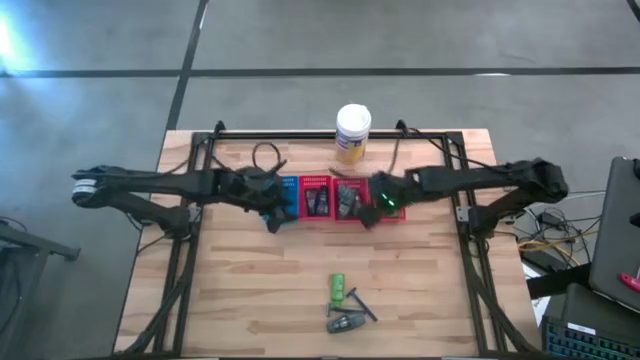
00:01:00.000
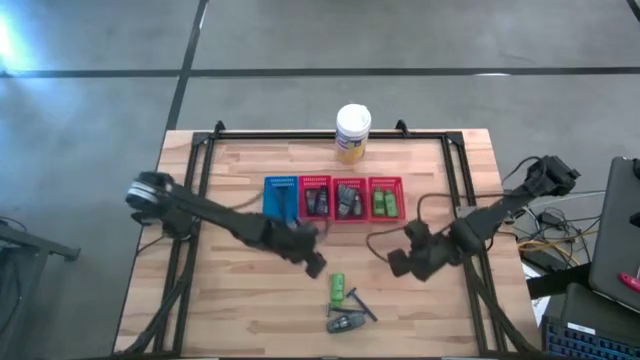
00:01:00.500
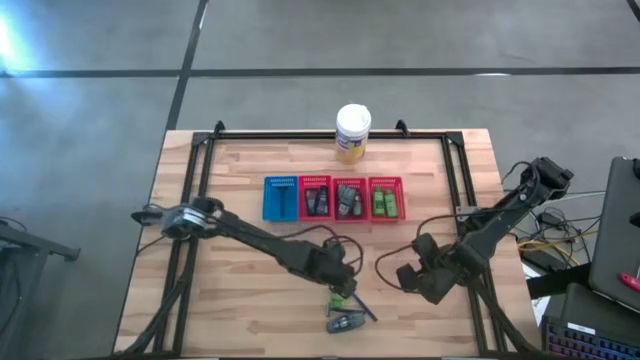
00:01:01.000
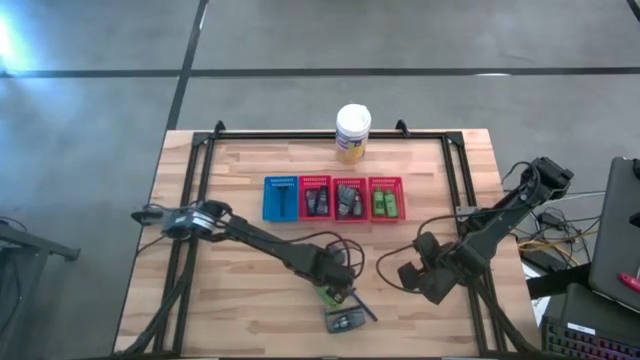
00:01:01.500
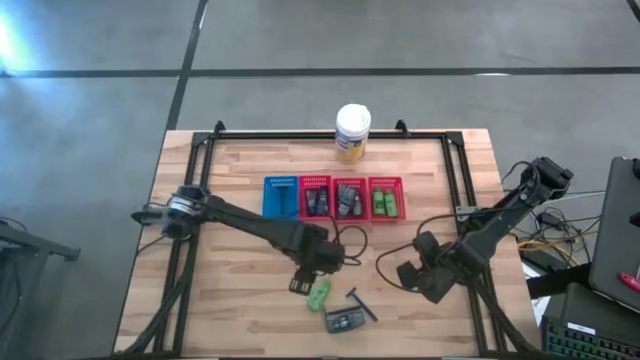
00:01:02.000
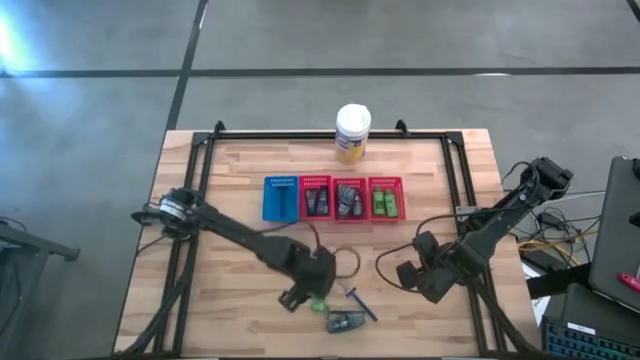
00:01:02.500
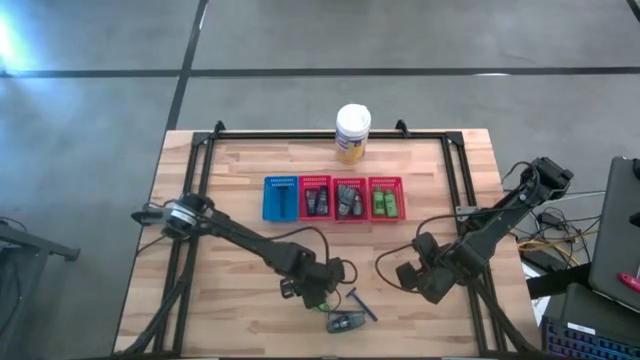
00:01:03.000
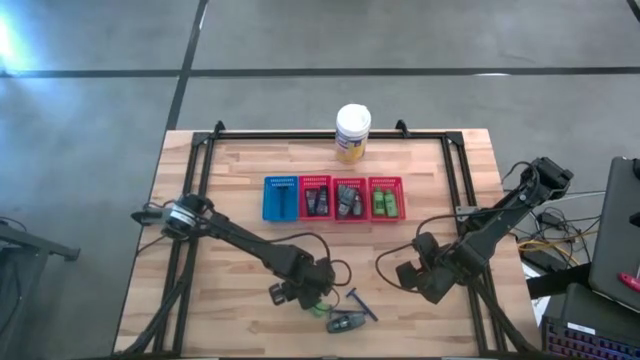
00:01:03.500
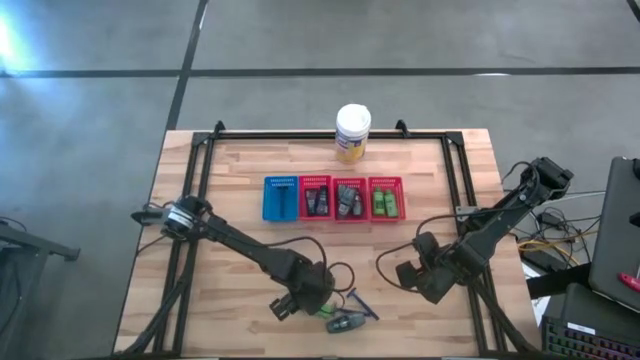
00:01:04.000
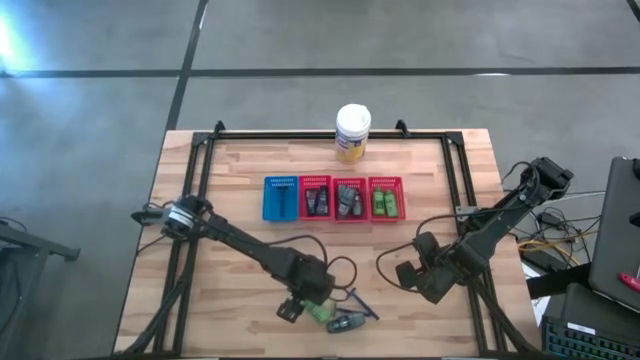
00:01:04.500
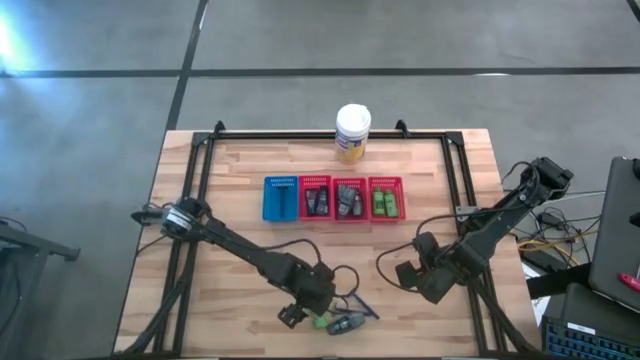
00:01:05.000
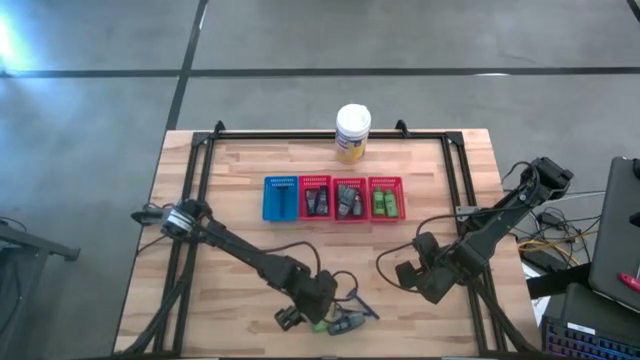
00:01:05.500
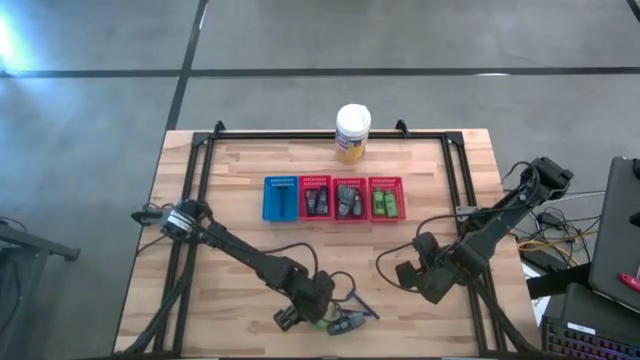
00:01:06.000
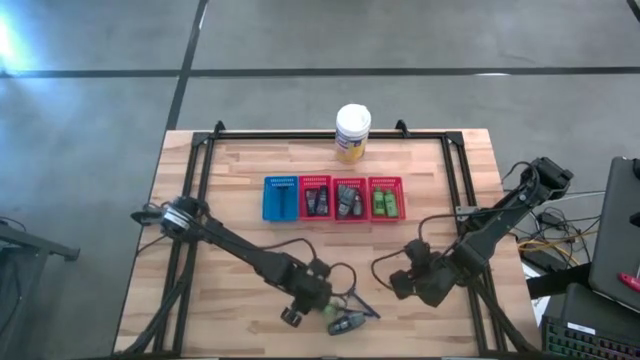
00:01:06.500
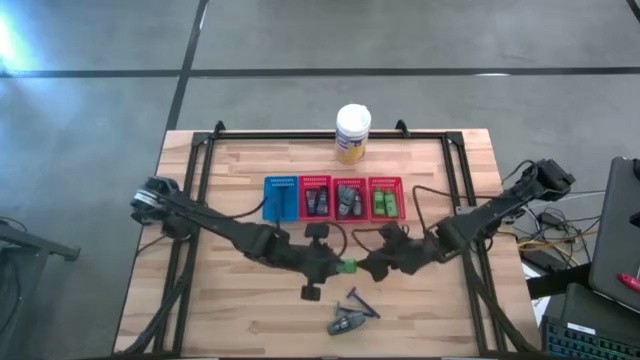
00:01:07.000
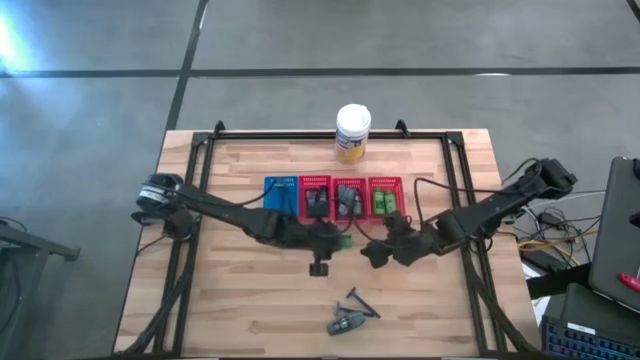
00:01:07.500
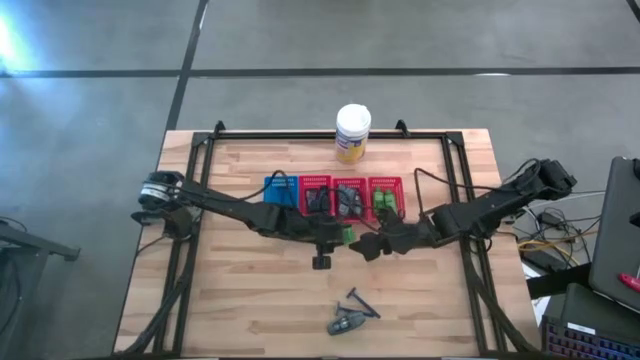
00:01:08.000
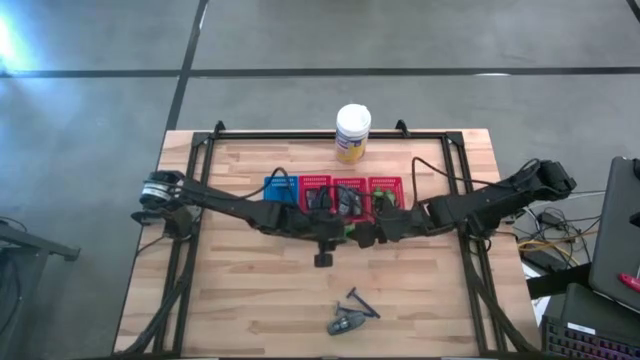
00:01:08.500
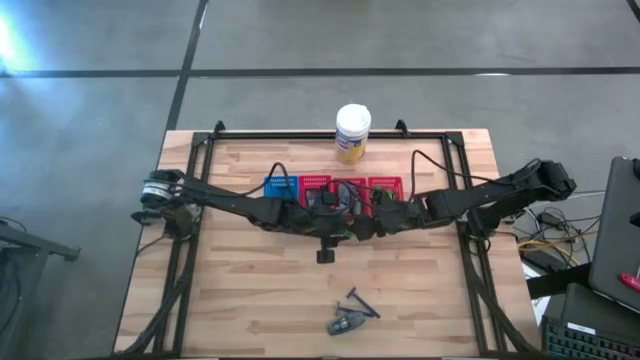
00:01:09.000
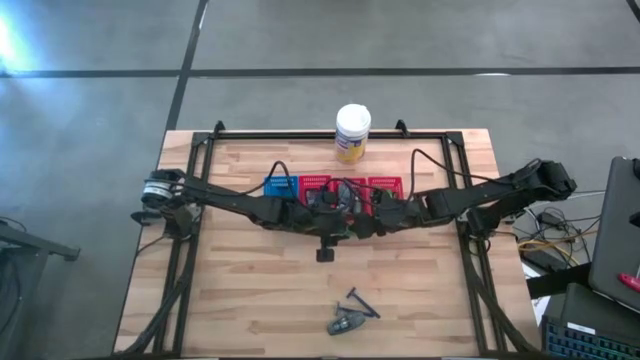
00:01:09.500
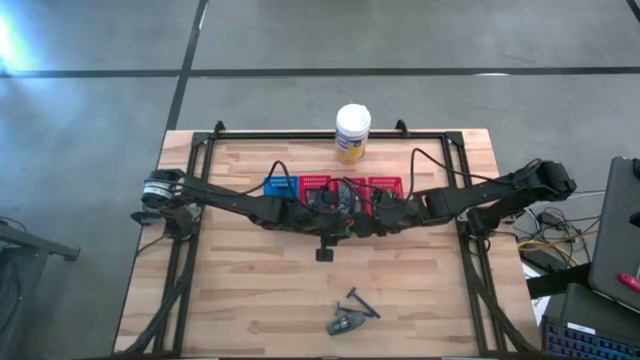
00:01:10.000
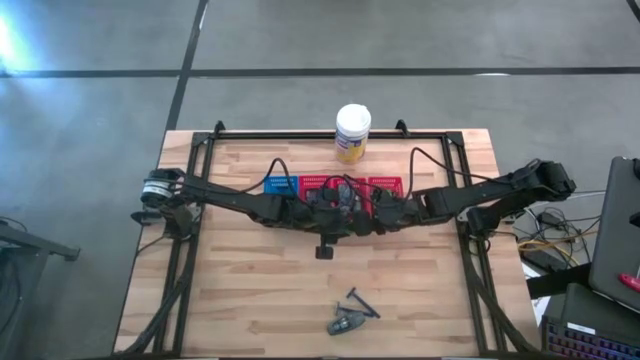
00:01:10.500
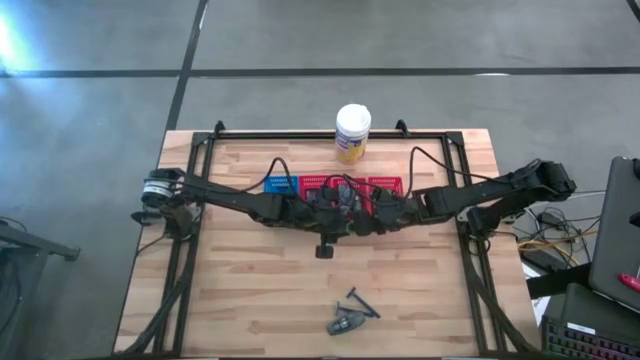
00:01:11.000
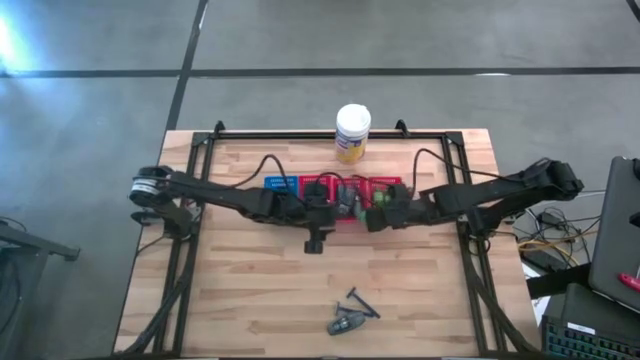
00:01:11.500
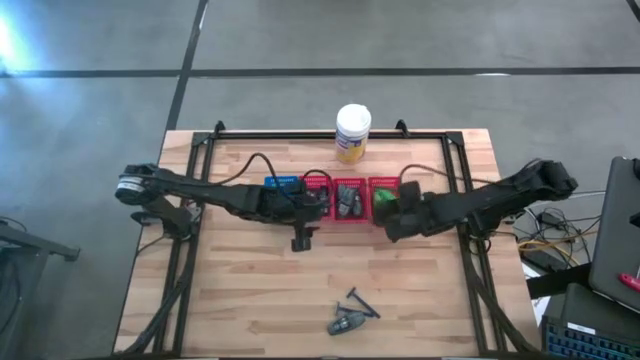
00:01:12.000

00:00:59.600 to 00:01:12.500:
Task: Pick & Place Travel size toiletries
Put the green shampoo into the right red bin

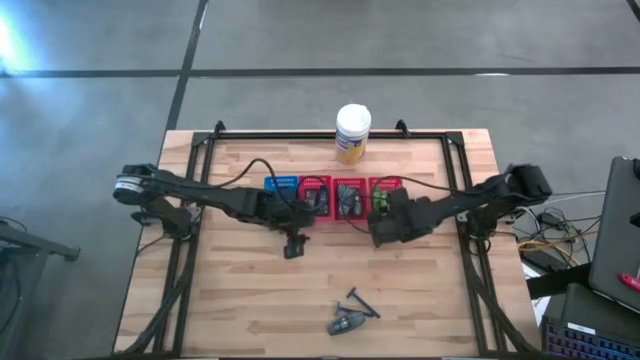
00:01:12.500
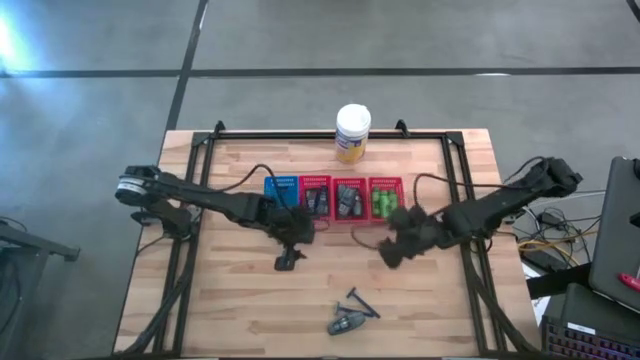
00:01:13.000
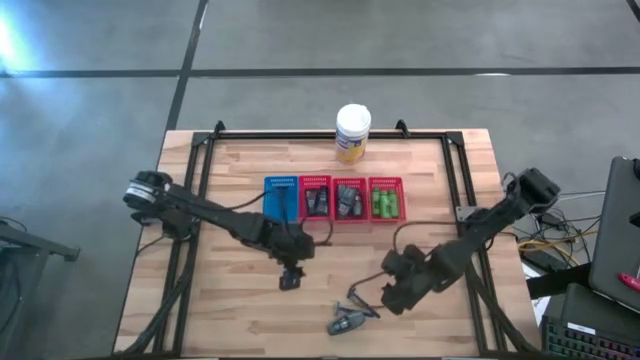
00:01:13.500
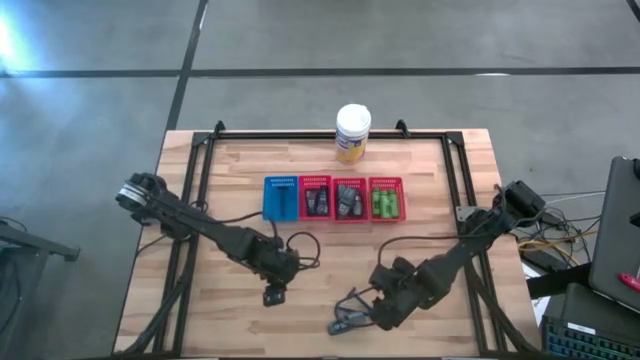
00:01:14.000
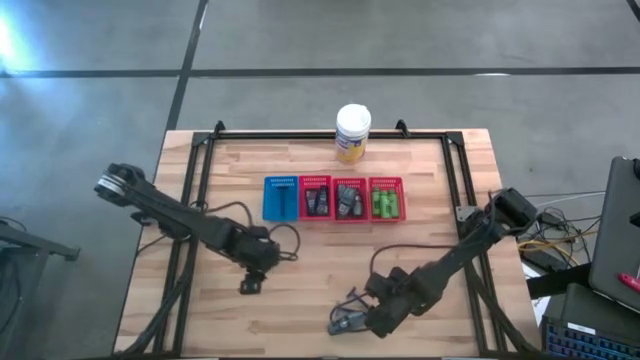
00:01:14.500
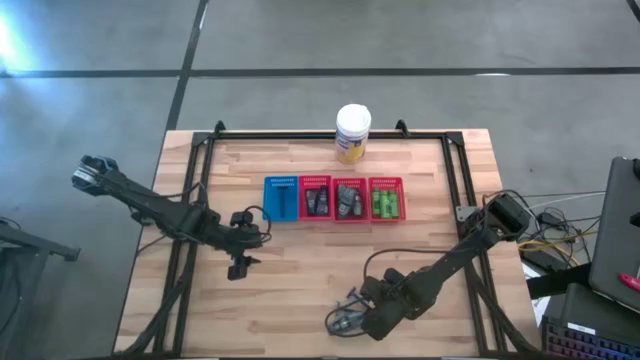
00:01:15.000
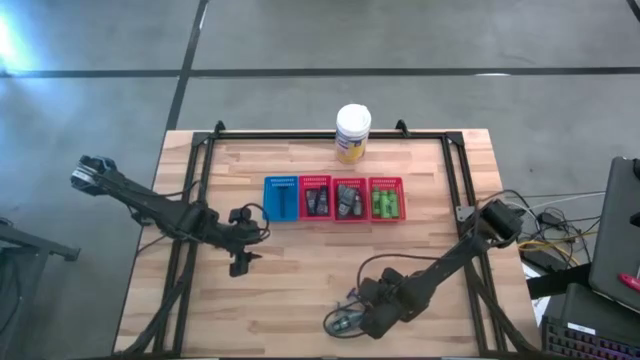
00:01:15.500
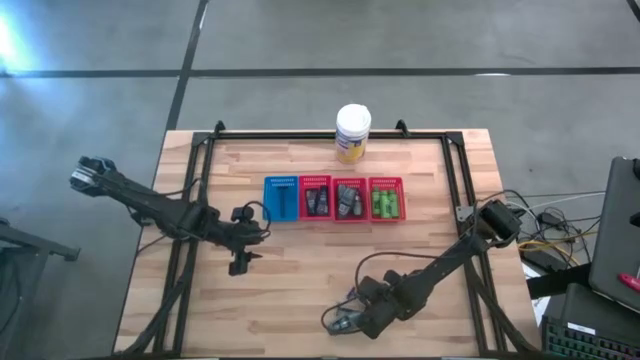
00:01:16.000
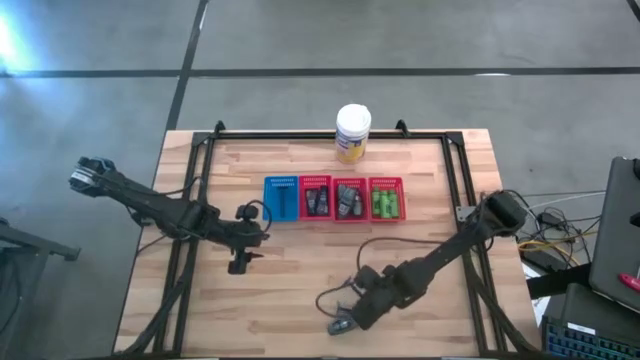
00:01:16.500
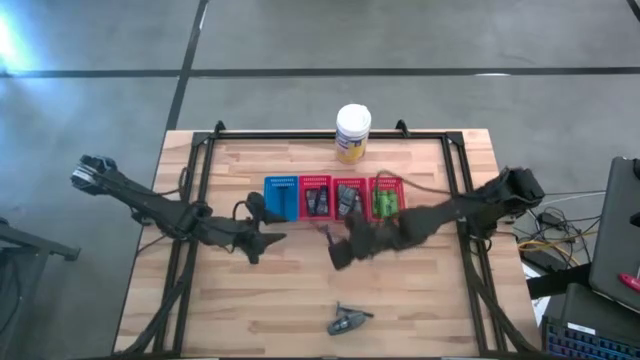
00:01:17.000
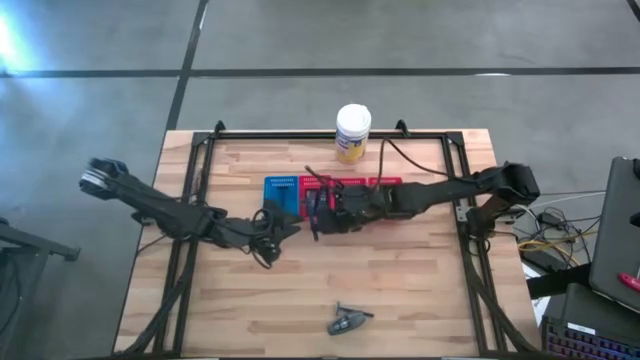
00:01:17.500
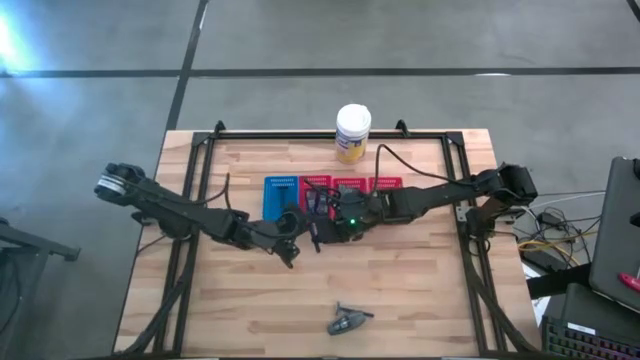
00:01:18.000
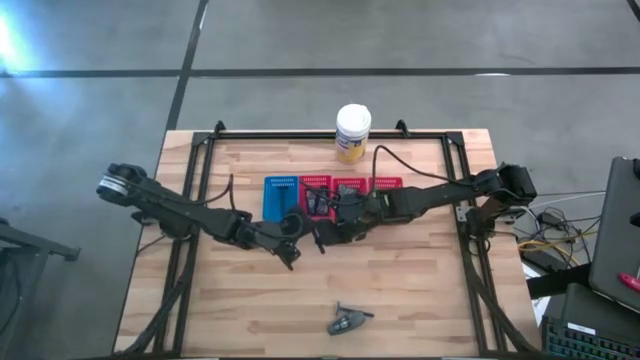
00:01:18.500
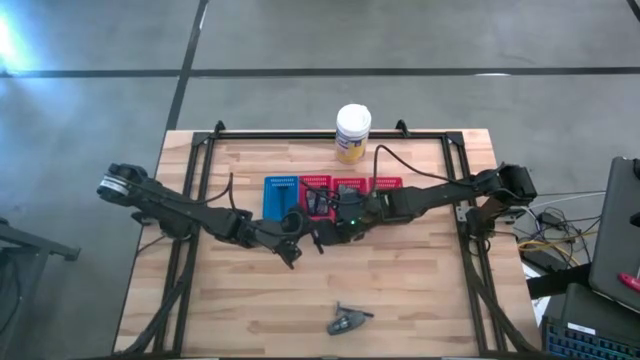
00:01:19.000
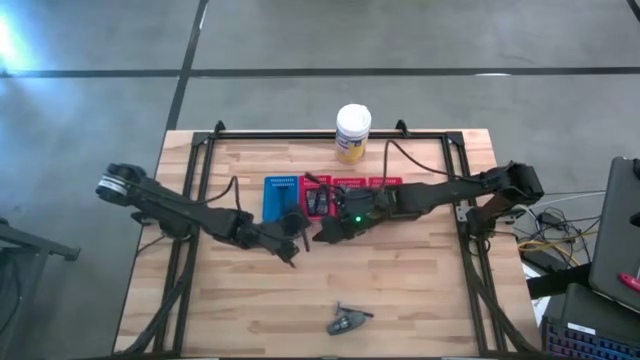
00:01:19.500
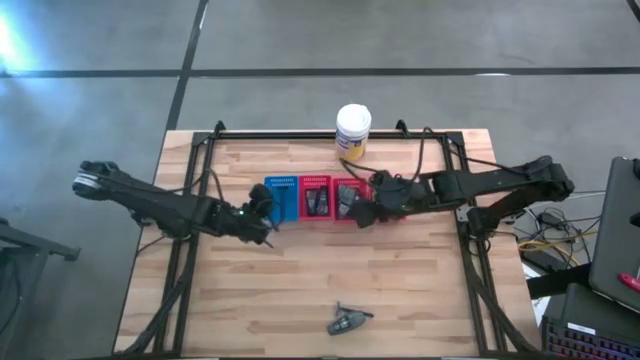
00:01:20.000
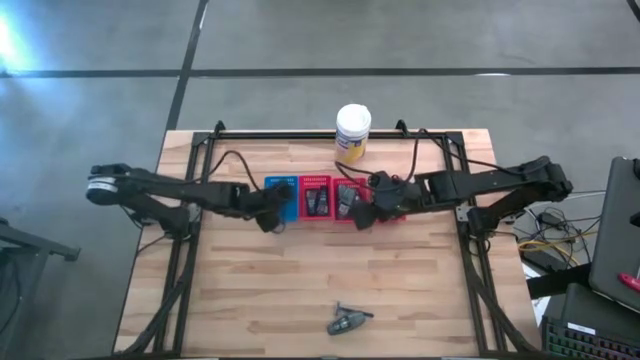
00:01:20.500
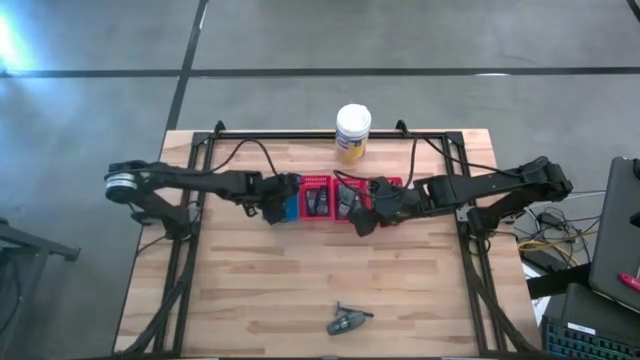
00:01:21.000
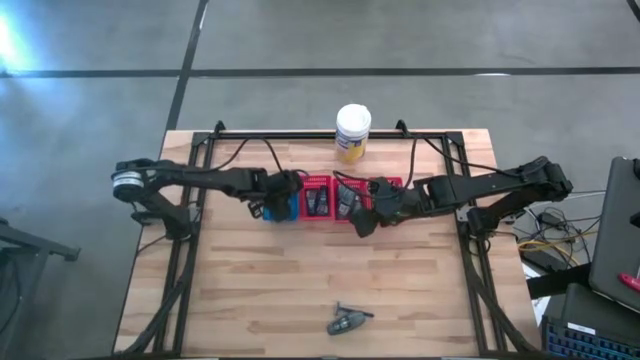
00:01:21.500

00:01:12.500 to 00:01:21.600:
Put the blue razor into the blue bin
